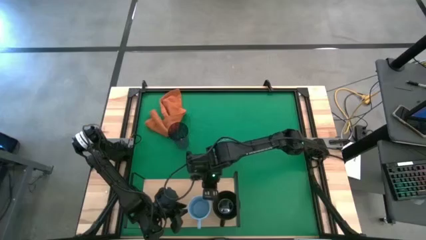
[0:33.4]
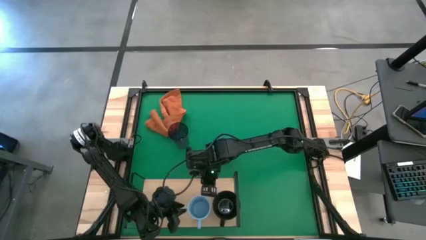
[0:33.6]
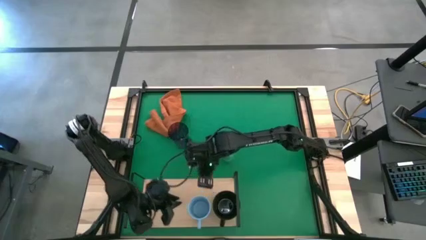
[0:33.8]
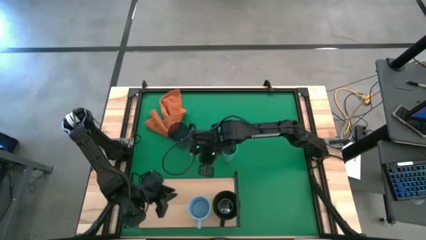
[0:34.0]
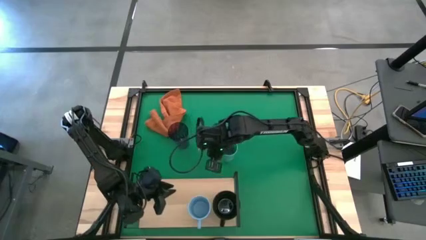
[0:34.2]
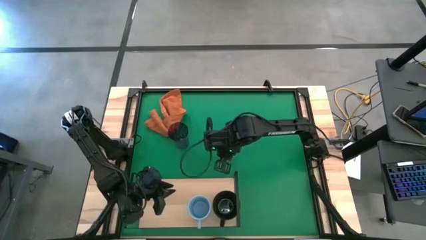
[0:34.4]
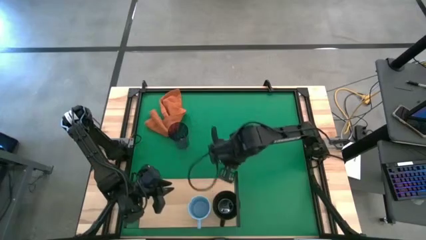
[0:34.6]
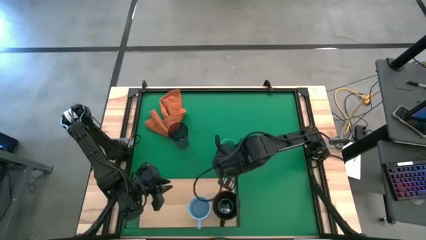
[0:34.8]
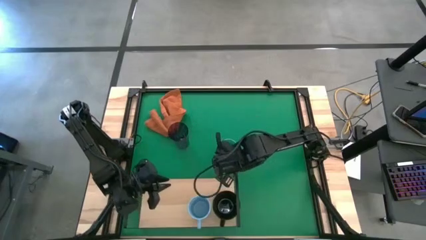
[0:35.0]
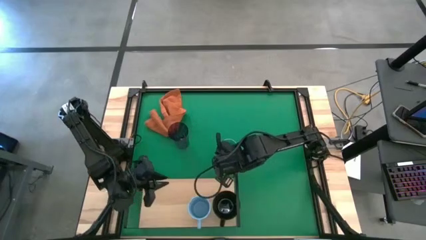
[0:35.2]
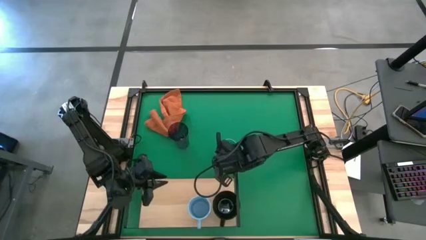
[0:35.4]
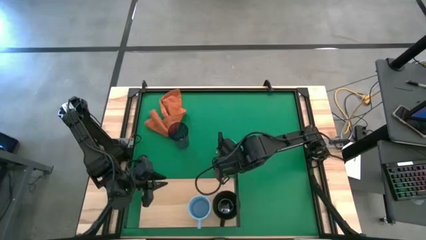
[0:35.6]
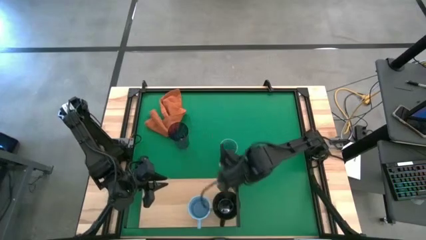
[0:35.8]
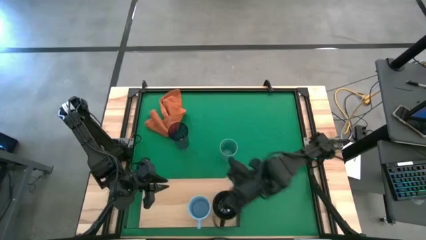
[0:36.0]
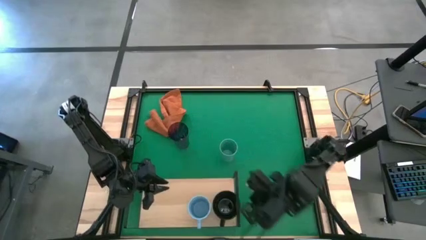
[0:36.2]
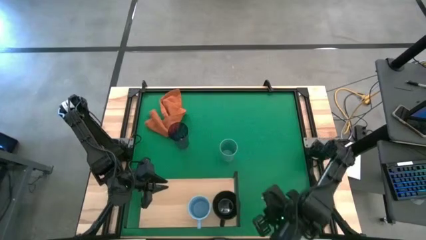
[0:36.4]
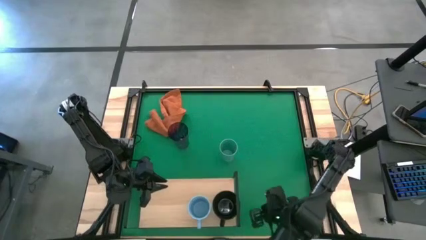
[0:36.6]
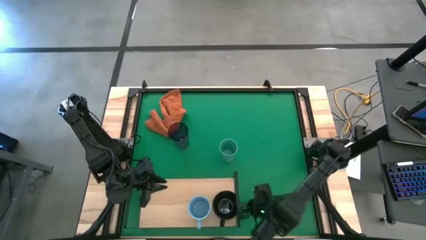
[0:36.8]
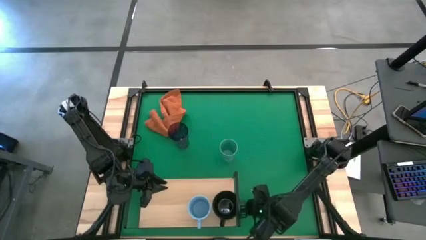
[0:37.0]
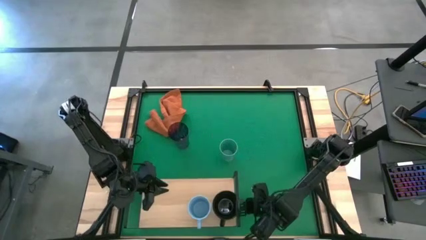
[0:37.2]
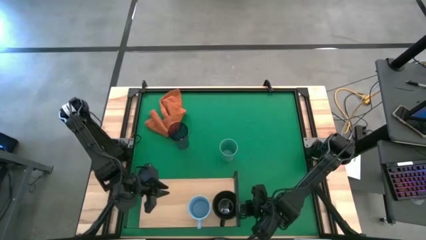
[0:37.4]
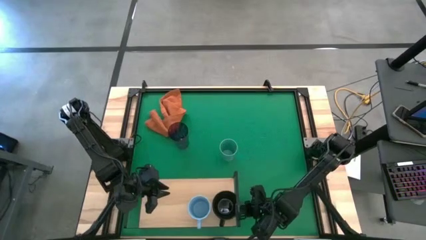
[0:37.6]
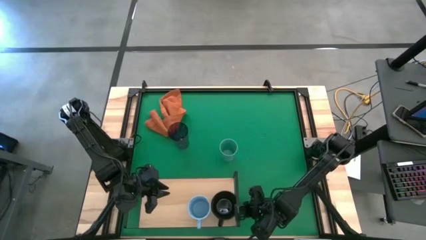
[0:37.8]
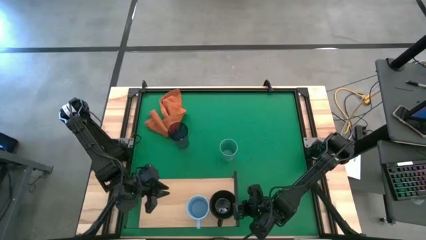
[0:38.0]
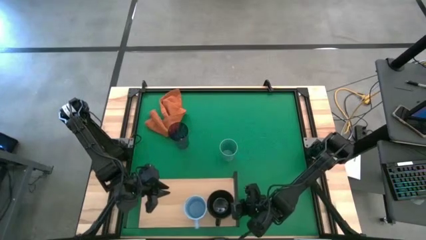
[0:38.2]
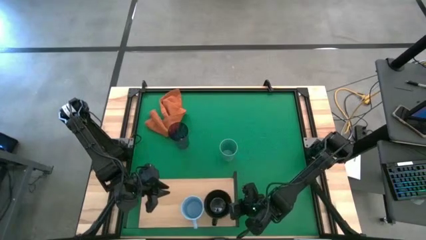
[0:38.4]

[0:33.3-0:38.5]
Task: Stack small to large cups/mugs on shelf
Adjust the black mug on the shelf

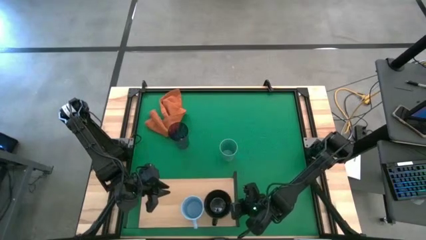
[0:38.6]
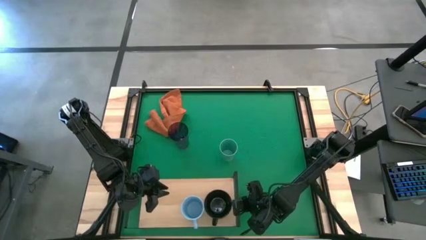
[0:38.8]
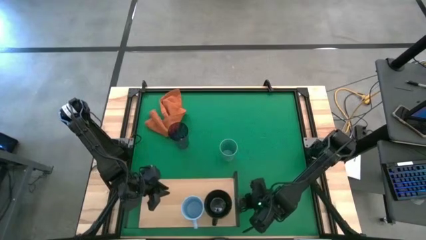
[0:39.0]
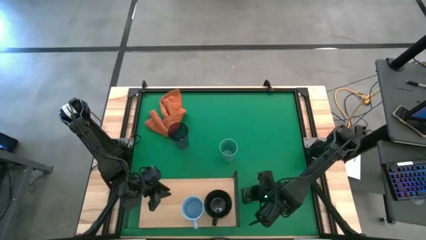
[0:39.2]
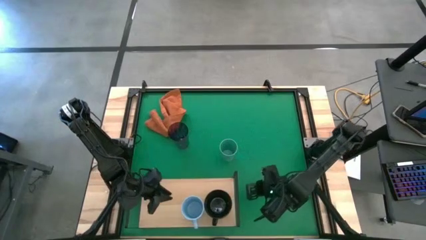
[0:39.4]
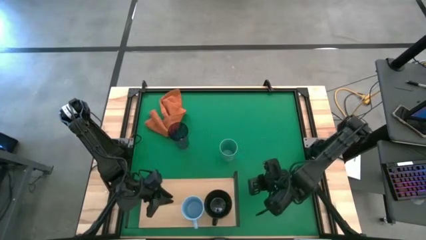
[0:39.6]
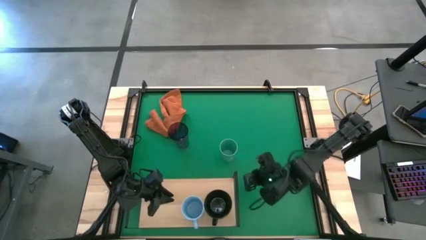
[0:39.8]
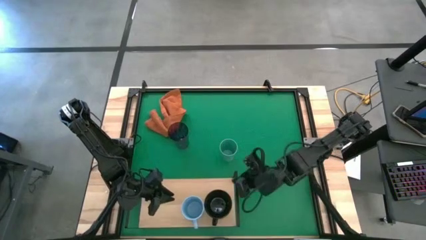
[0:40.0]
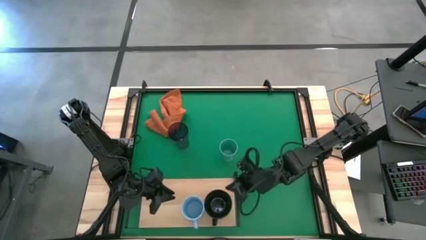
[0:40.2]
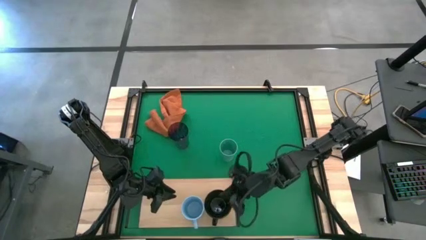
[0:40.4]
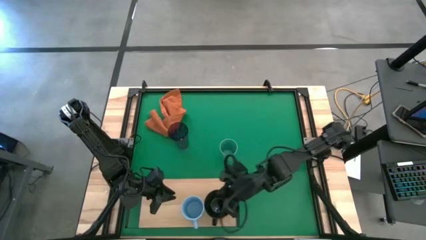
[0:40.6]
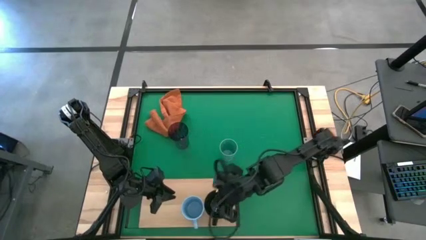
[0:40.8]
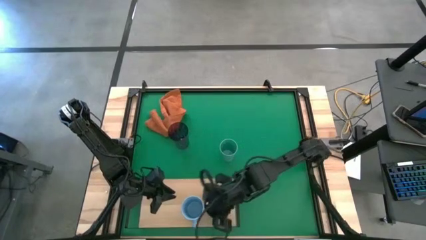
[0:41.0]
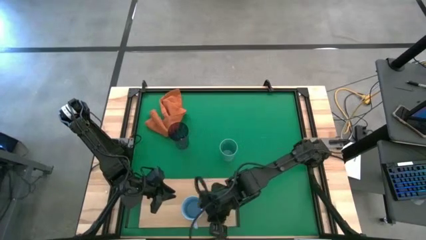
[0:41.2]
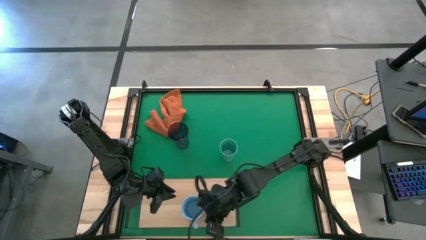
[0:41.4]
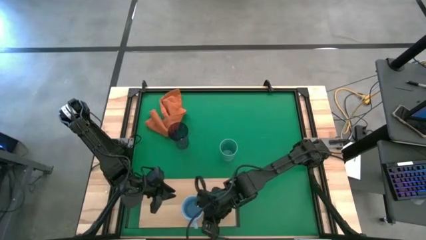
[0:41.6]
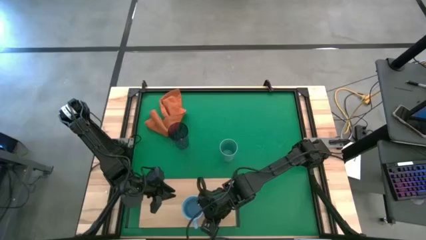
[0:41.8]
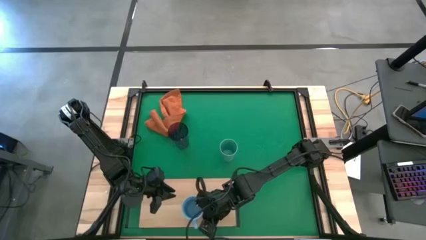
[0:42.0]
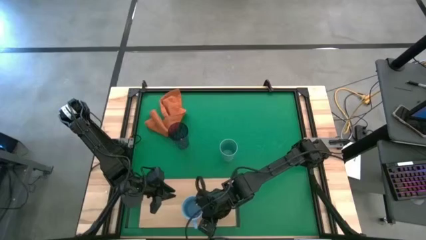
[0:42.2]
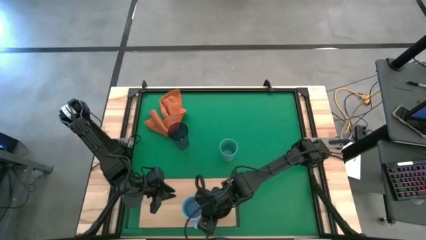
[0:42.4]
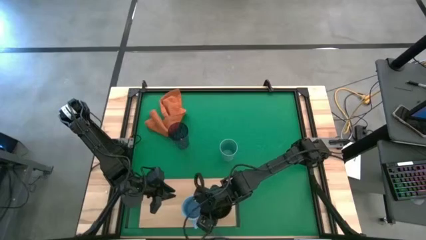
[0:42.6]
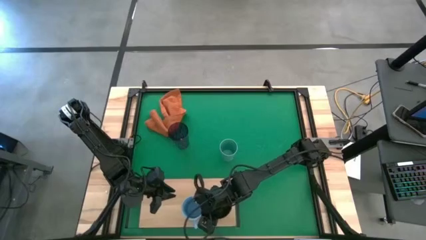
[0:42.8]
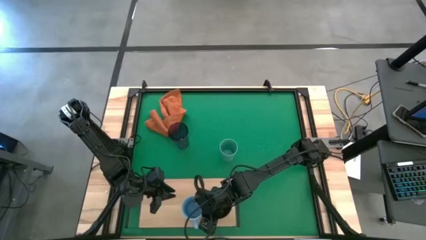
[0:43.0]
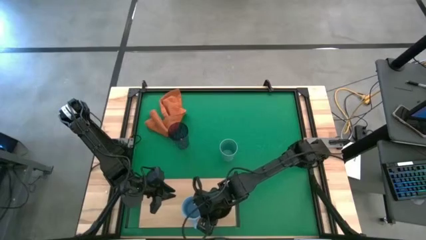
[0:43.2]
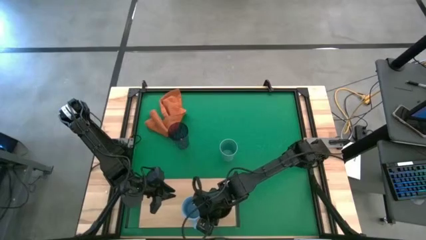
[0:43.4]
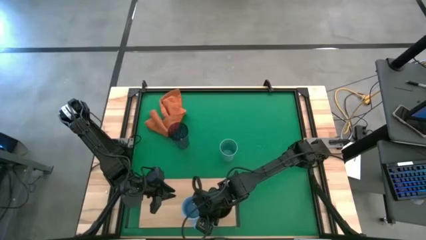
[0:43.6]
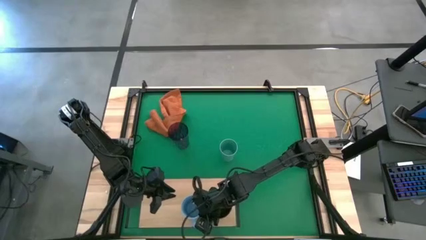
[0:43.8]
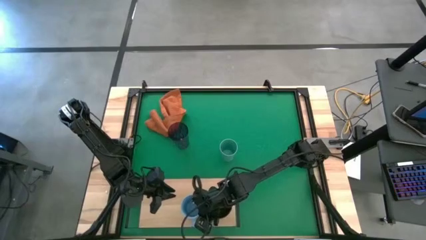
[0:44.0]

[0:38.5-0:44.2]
Adjust the blue mug on the shelf

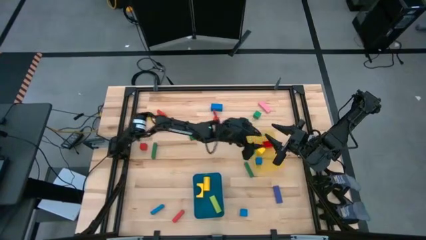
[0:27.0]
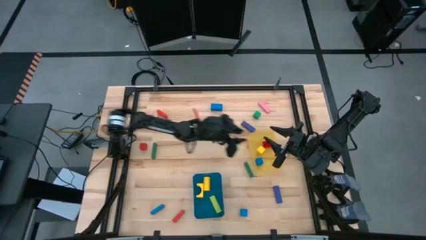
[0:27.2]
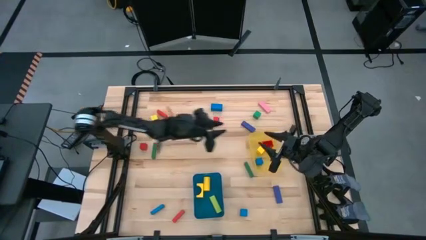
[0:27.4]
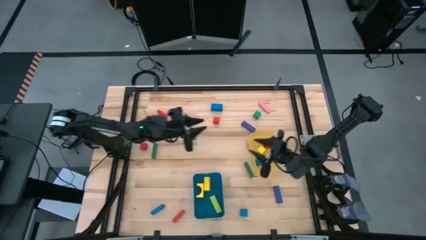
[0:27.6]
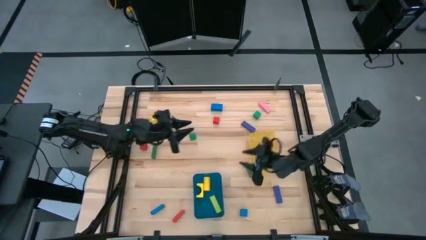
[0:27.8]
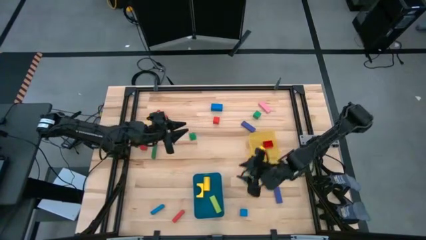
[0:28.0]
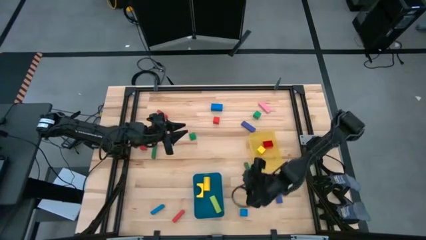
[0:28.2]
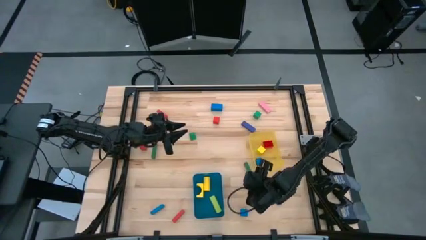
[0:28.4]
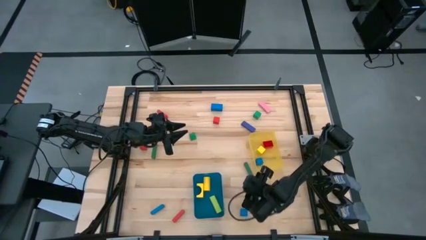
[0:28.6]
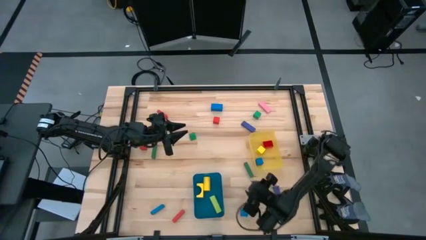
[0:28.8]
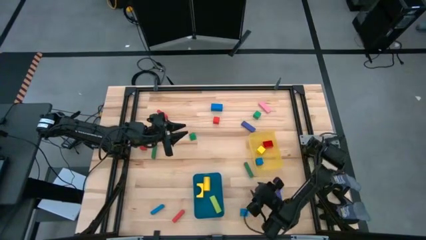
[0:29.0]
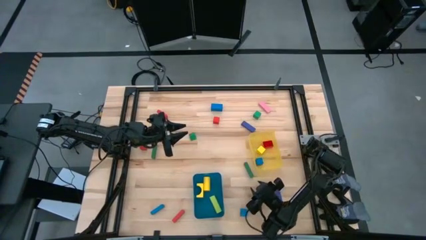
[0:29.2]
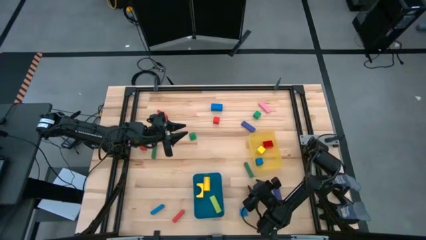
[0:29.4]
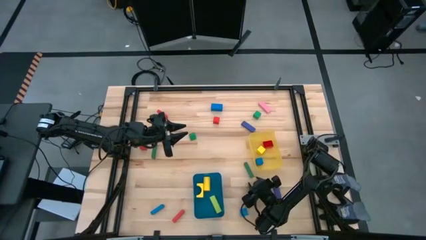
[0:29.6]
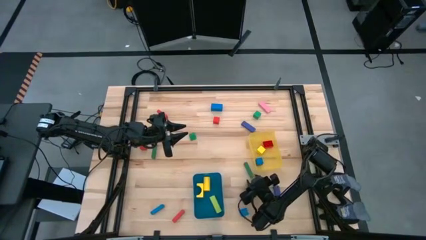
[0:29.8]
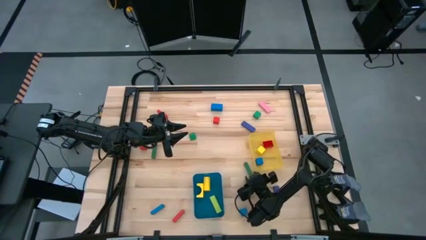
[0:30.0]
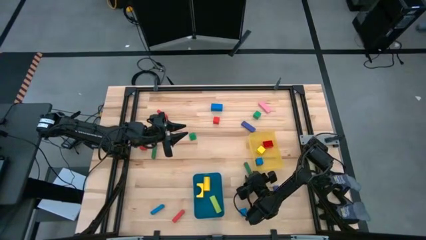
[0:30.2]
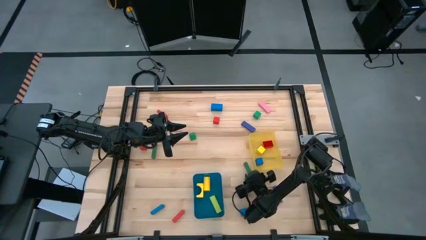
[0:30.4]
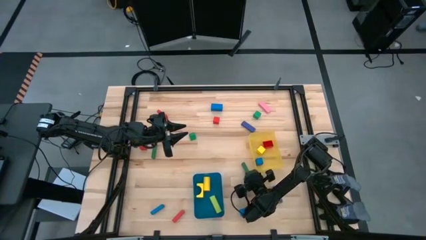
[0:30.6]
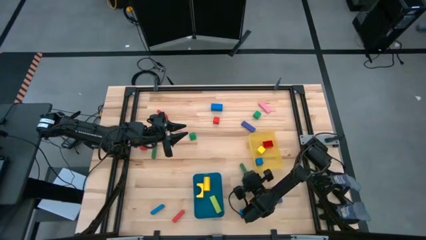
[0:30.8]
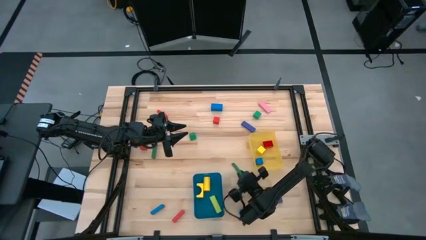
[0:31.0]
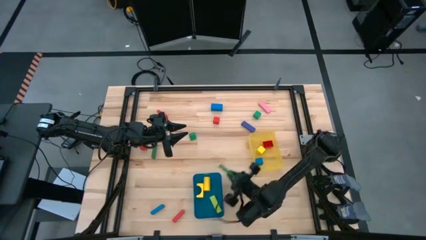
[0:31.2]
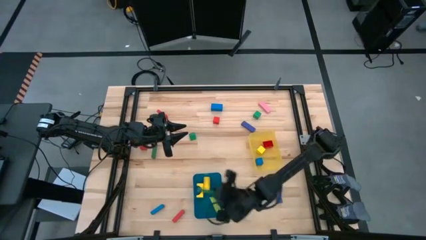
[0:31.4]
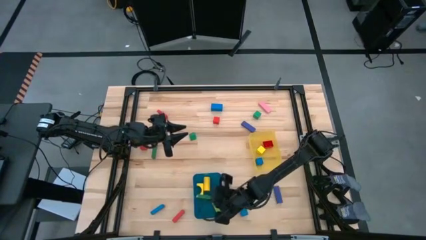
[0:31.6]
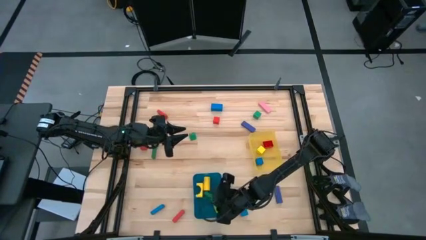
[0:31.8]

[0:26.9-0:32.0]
Task: Sort blocks by size
Put the large green block into the blue bin

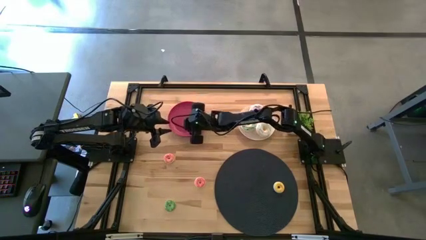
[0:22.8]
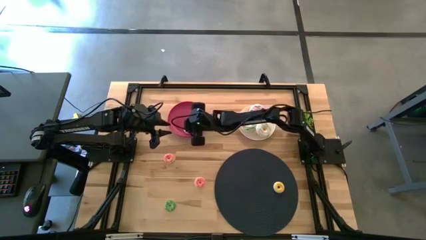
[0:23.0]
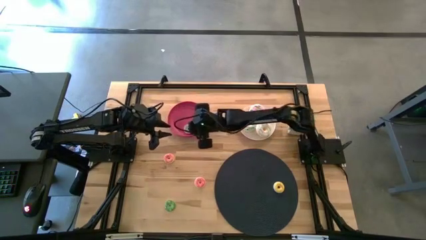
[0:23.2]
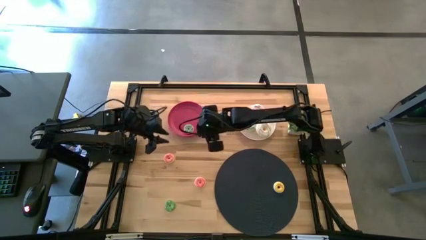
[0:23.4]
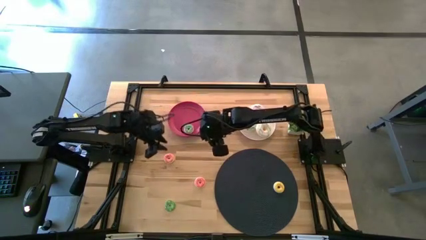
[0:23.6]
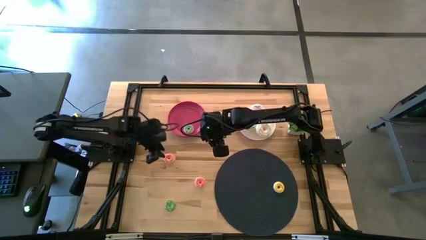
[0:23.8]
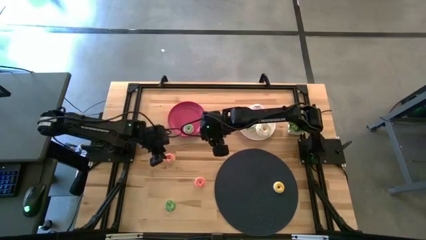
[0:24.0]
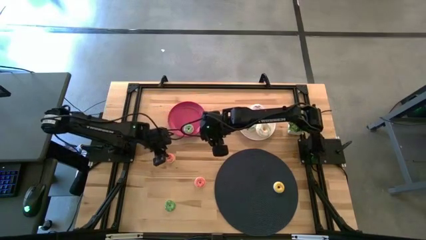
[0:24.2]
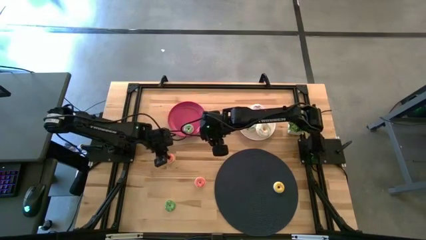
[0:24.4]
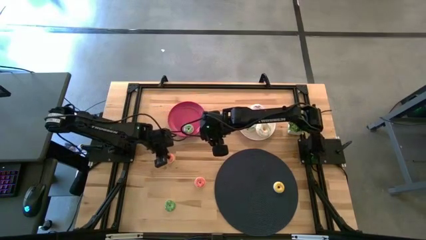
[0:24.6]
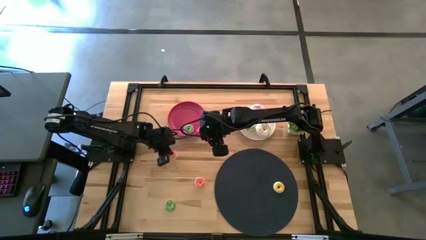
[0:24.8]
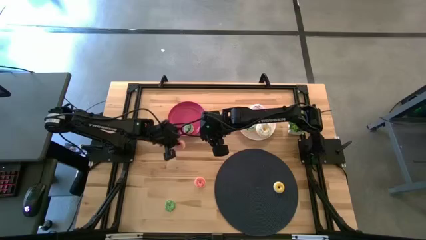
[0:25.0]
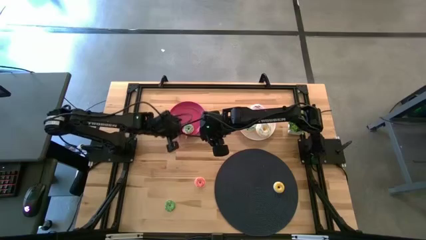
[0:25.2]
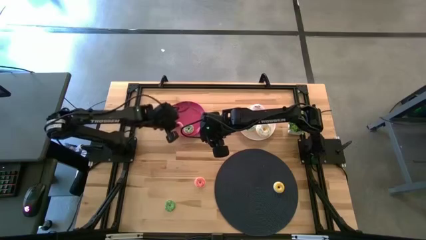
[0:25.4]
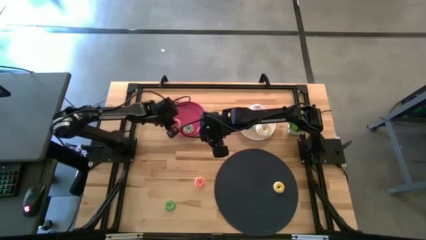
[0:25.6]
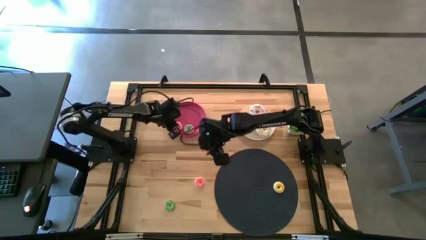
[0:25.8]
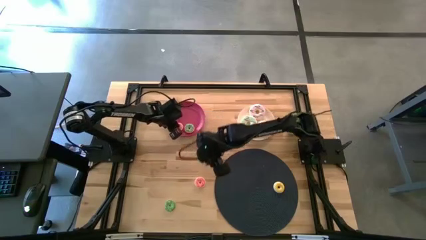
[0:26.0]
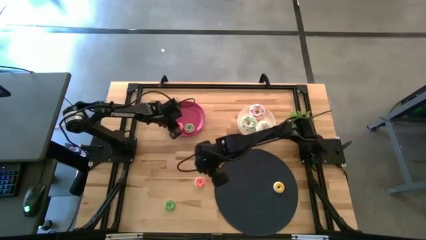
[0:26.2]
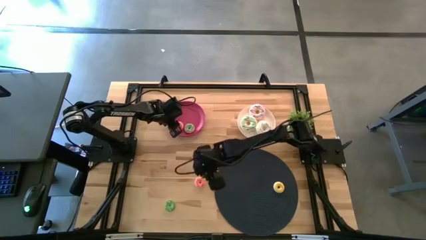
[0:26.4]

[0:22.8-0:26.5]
Task: Pick & Place donuts
Put the left small red donut on the pink plate
